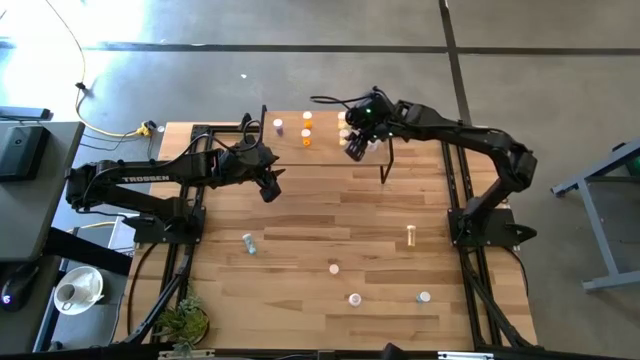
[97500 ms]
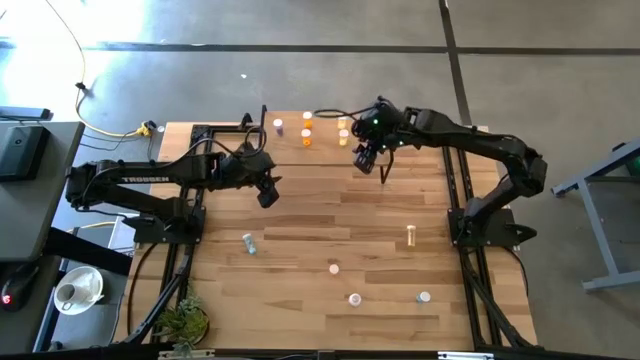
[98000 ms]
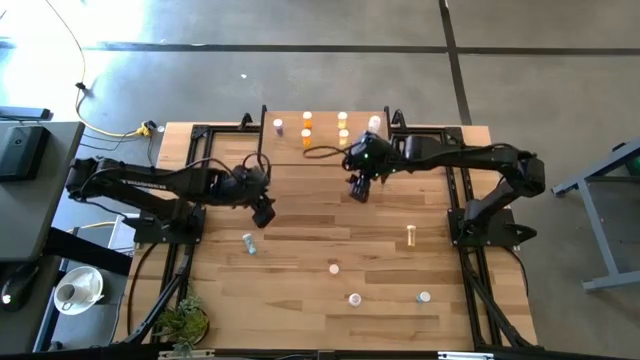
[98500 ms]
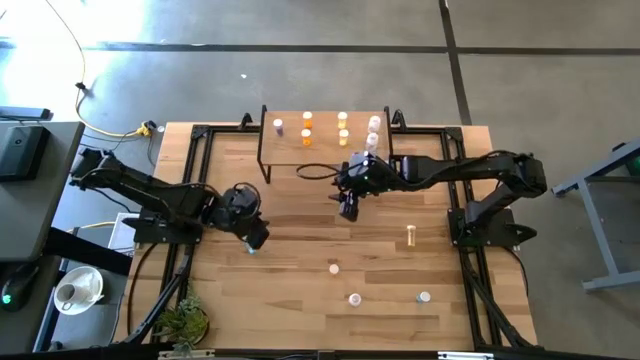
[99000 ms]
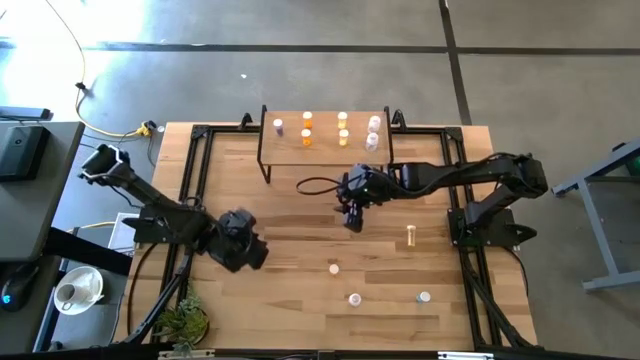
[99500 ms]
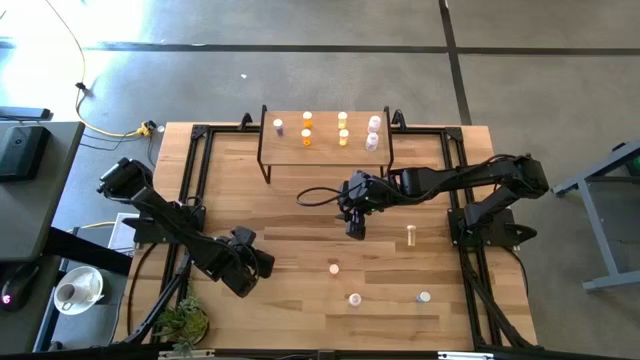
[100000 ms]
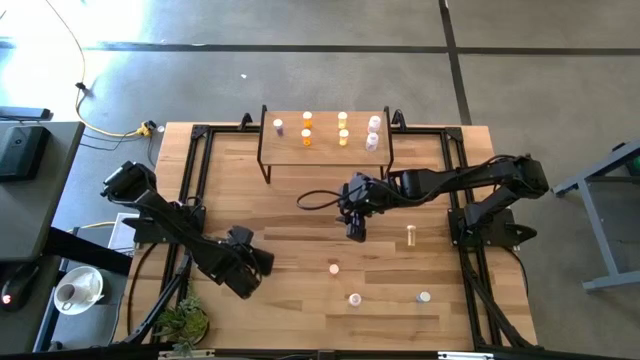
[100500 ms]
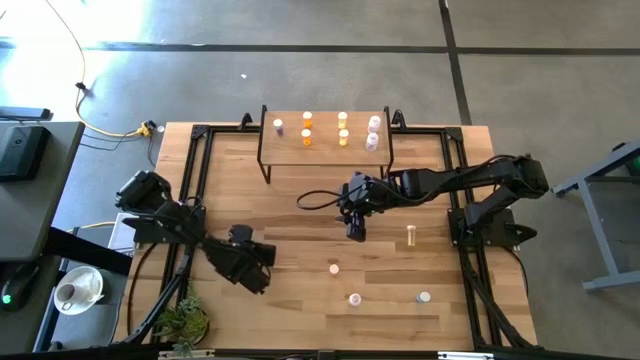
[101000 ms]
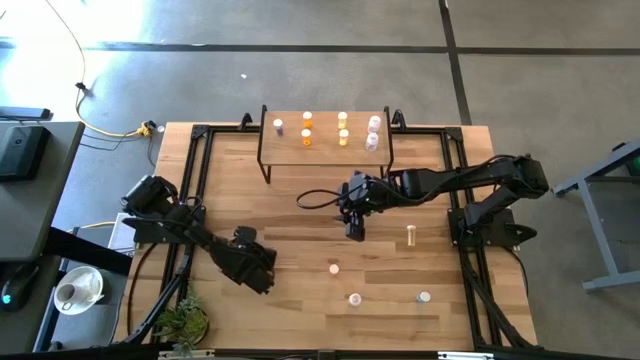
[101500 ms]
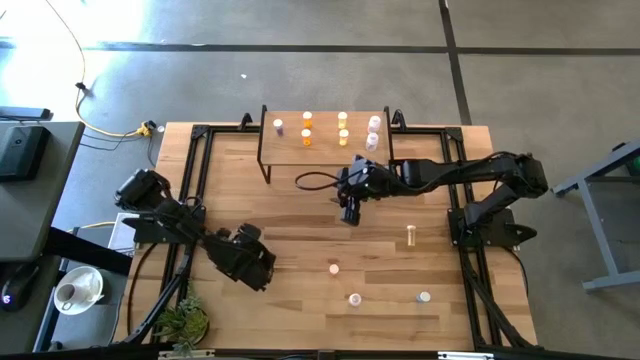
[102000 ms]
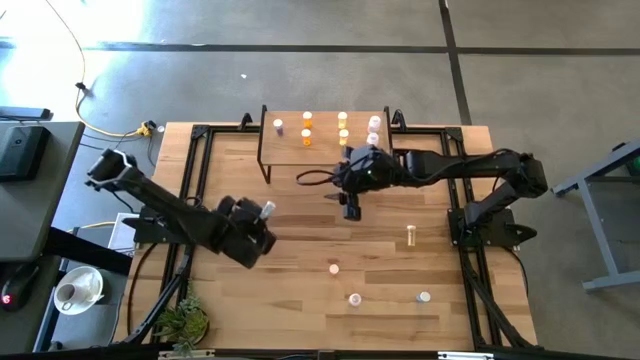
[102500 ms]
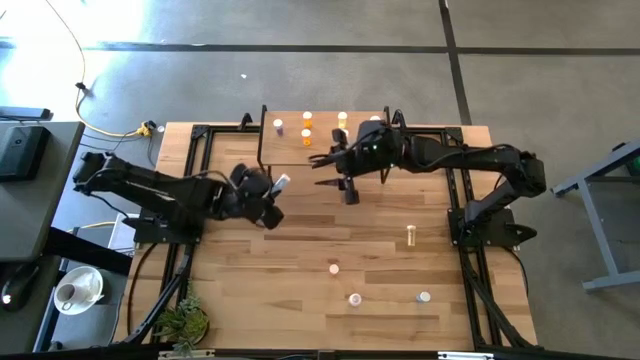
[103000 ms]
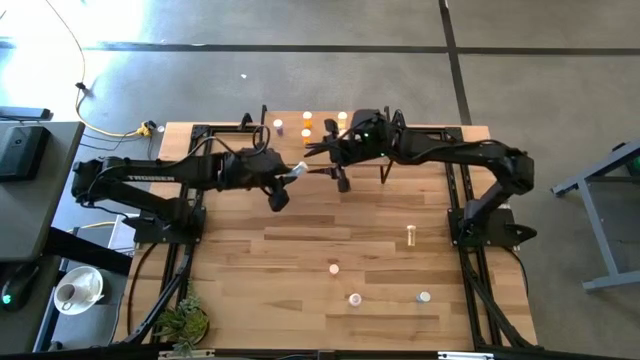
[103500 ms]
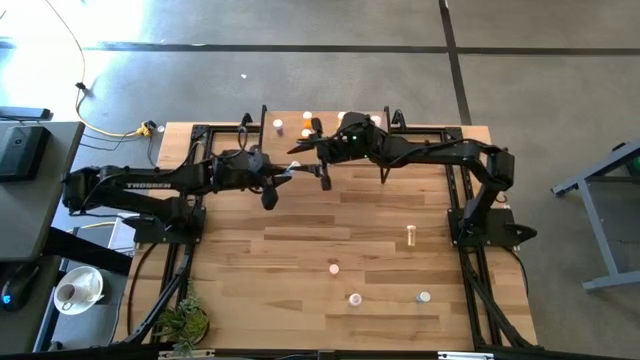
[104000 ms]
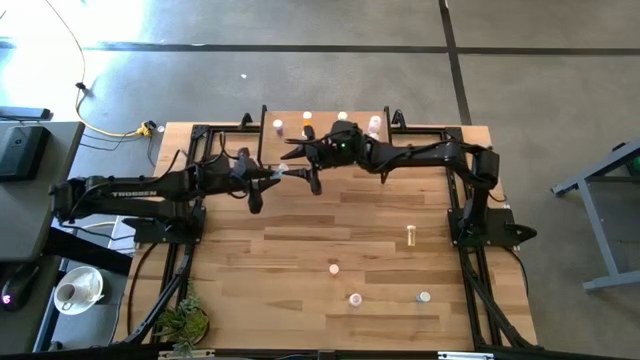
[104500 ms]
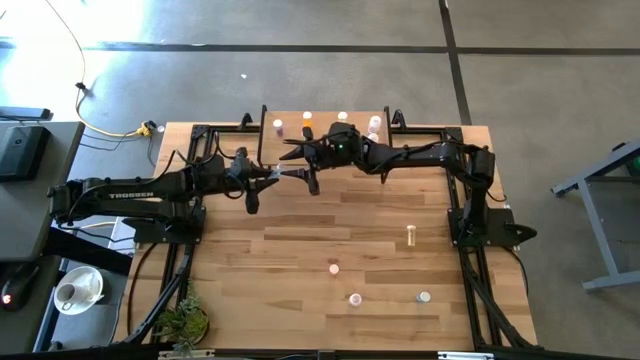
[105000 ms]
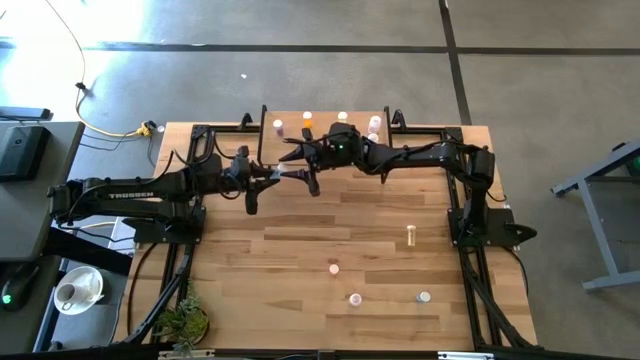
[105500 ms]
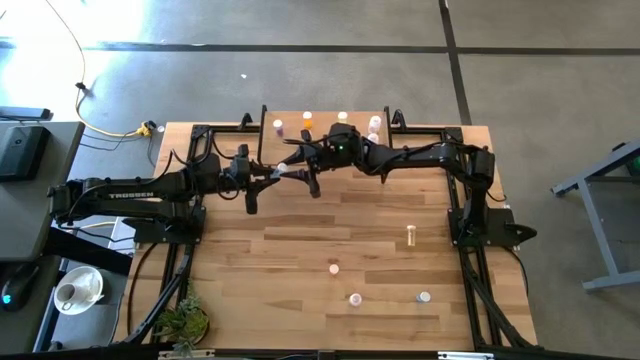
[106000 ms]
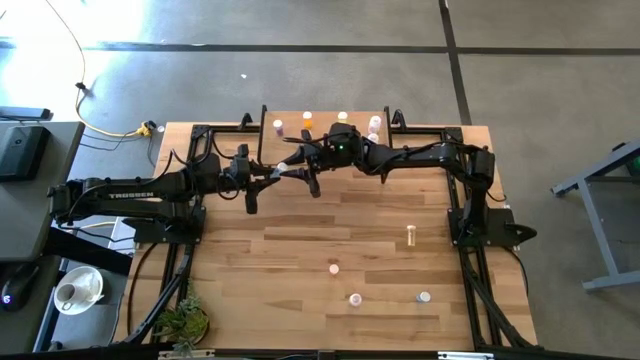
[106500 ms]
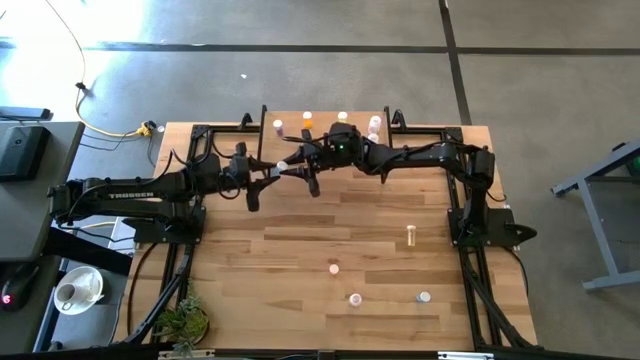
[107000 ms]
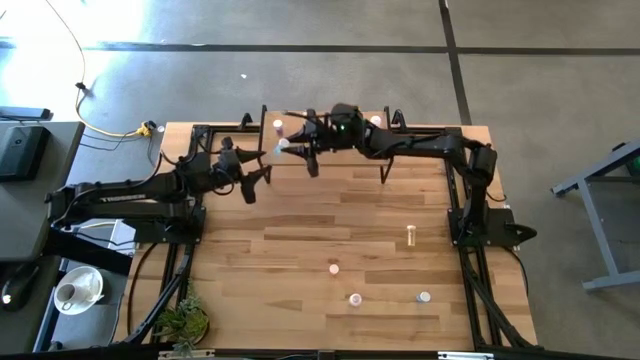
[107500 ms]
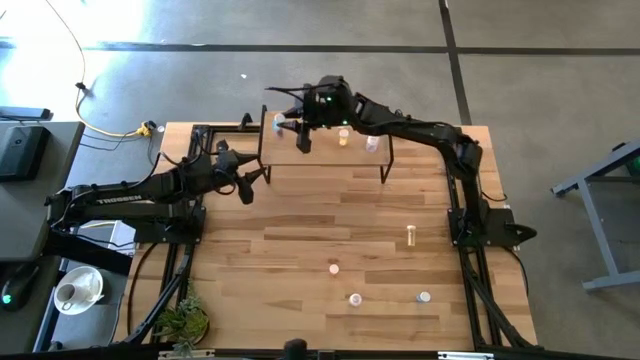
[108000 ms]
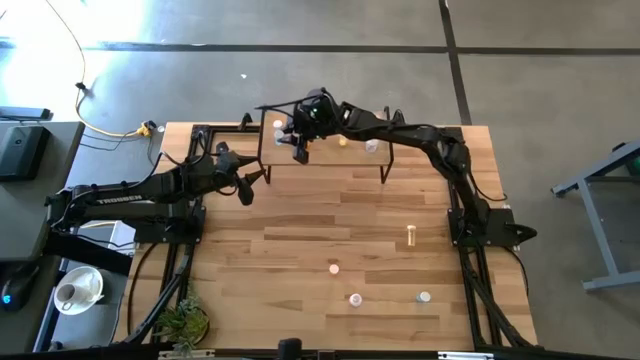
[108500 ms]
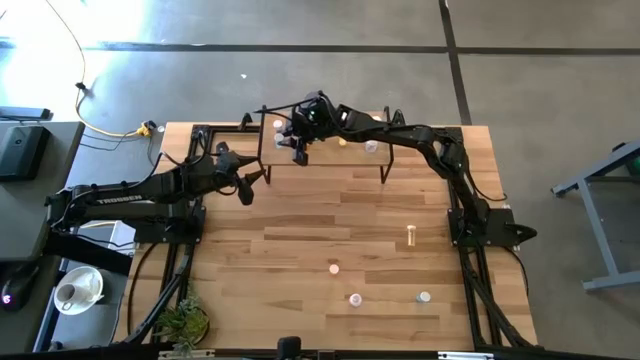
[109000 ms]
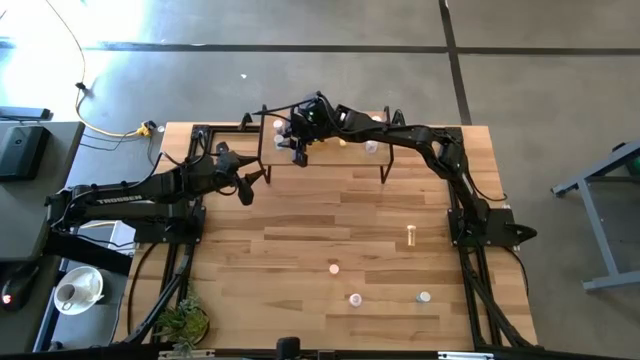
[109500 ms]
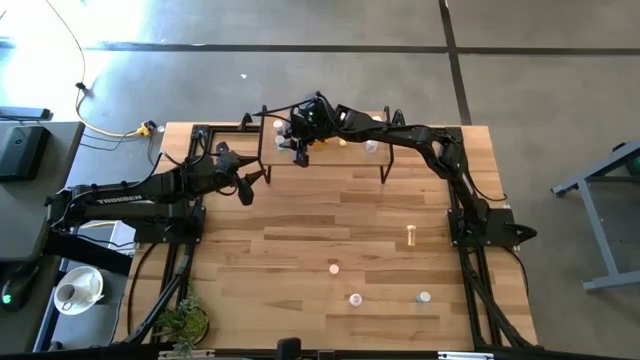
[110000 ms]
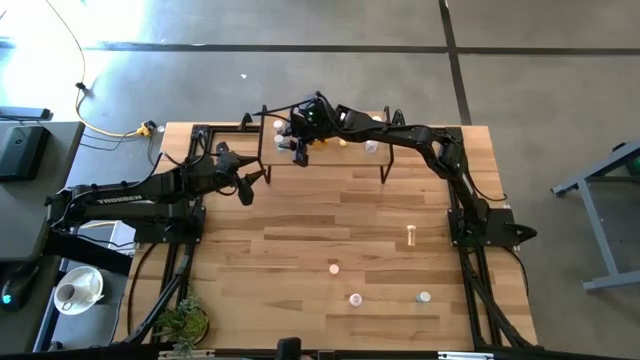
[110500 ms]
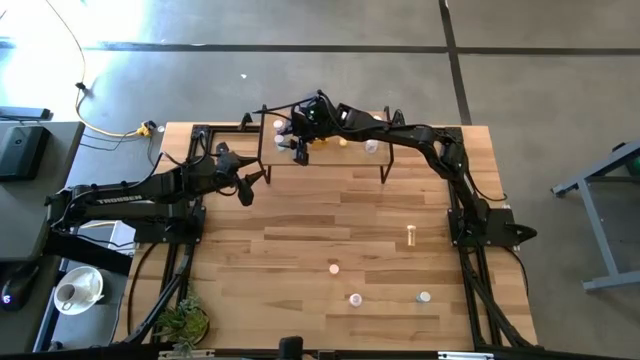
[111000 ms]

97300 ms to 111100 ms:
Task: Pick and place medicine bottles onto shelf by color
Put the left blue pill bottle on the shelf aligned with the other blue pill bottle

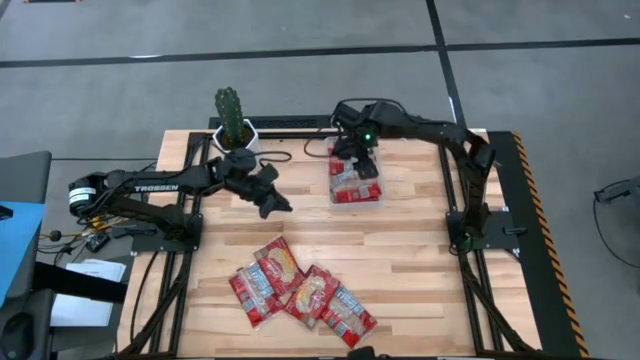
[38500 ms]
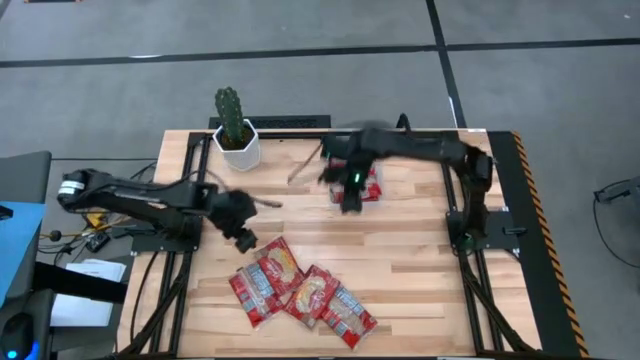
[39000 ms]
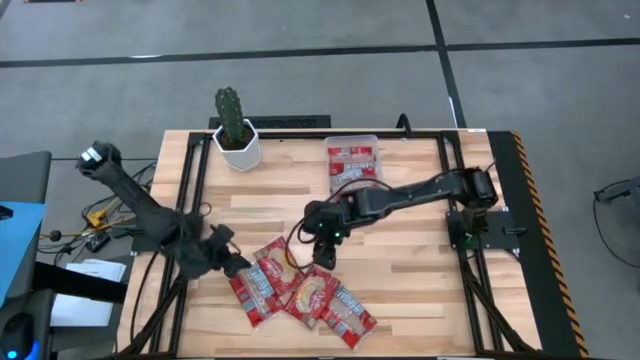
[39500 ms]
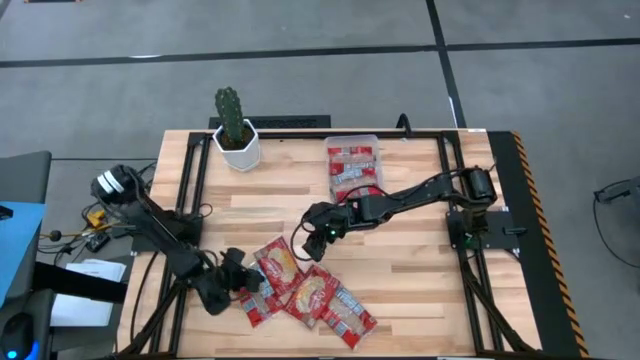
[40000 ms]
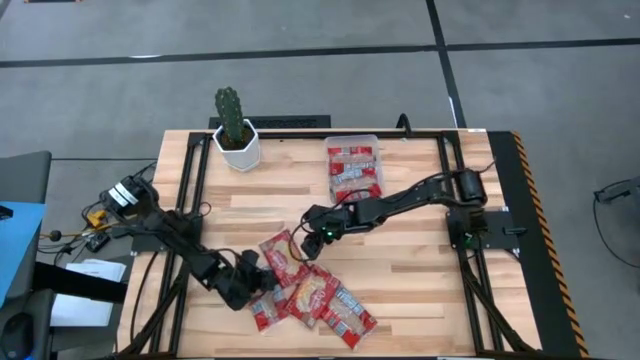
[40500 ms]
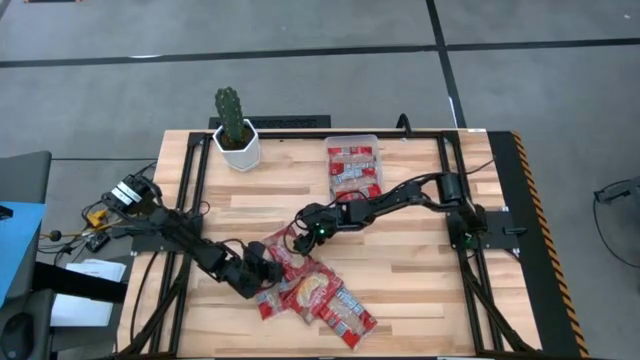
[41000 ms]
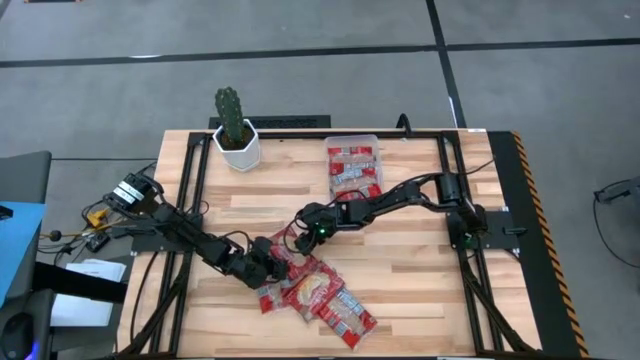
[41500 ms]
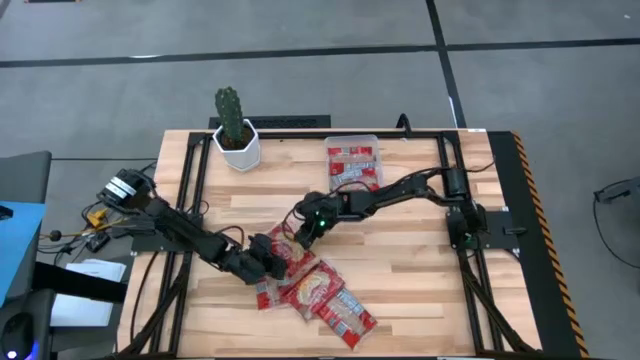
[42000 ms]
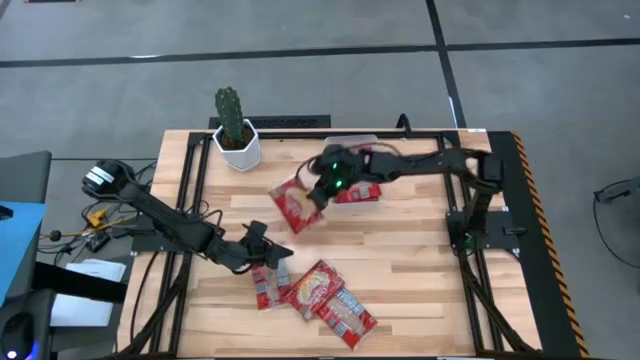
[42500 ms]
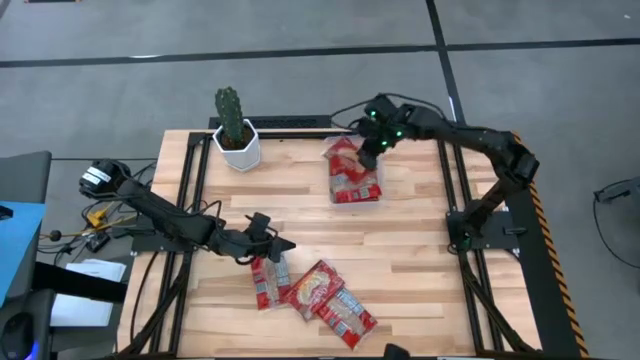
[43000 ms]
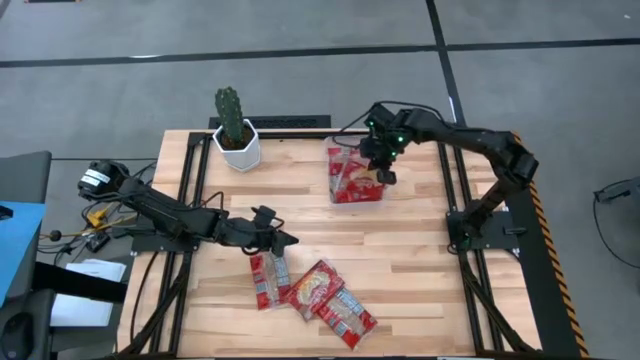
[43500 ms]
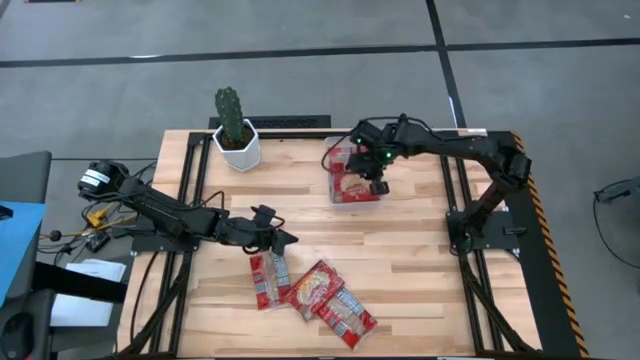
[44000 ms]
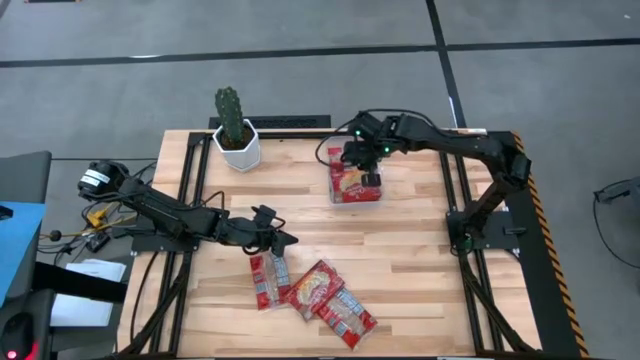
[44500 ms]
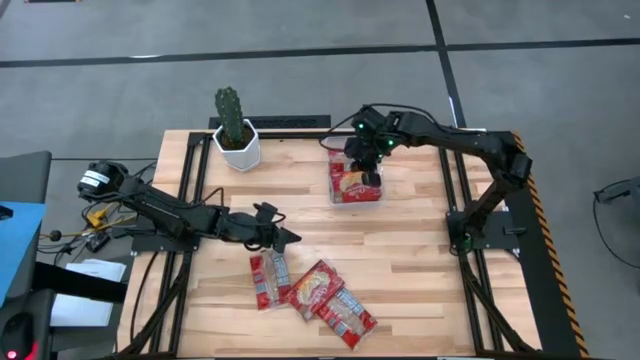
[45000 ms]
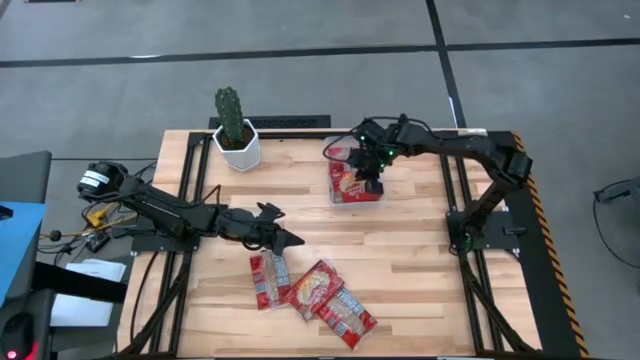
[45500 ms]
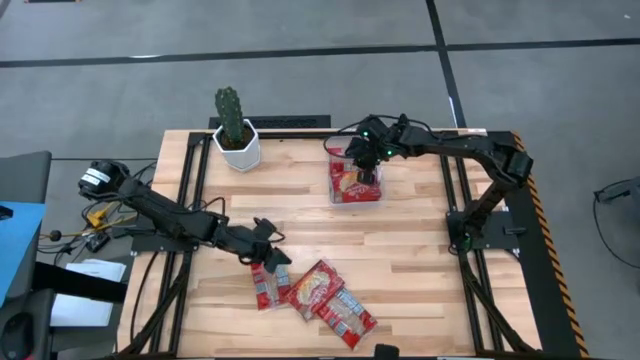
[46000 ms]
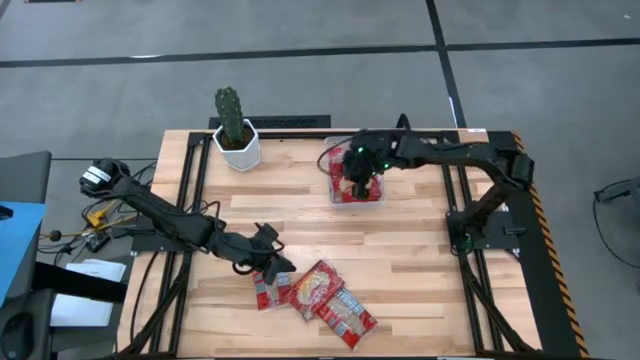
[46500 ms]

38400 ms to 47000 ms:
Task: Sort popcorn bags into baskets
Put the popcorn bag into the transparent bin
